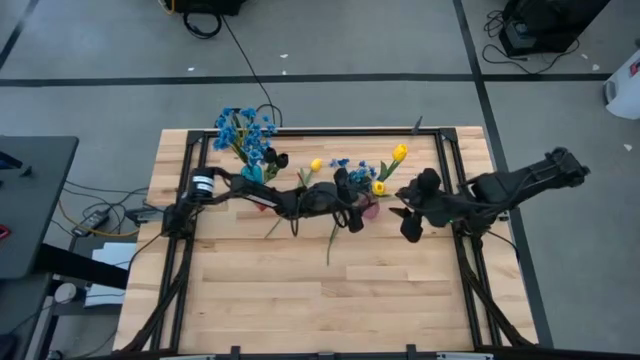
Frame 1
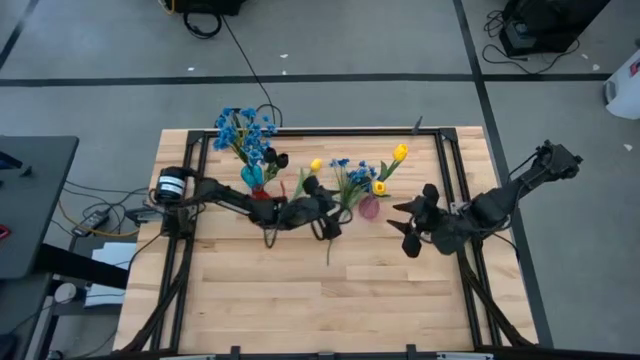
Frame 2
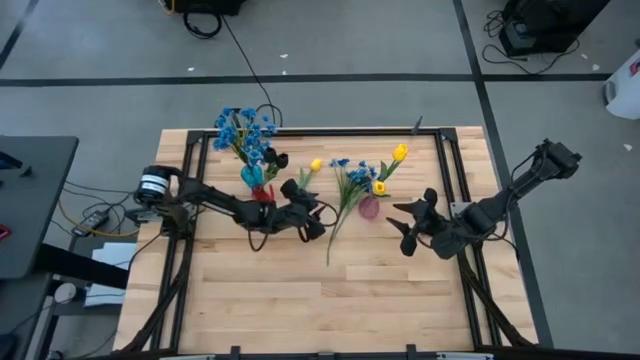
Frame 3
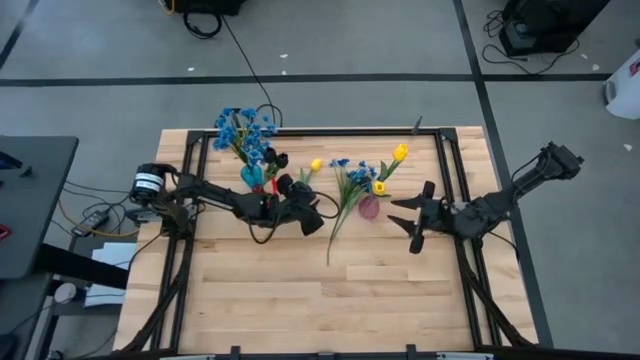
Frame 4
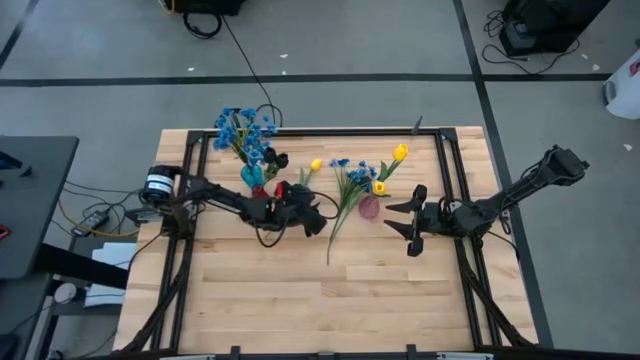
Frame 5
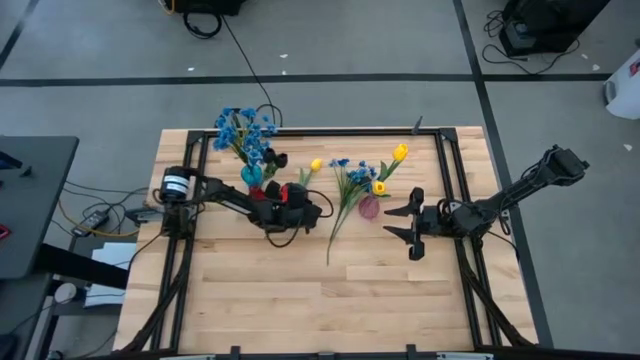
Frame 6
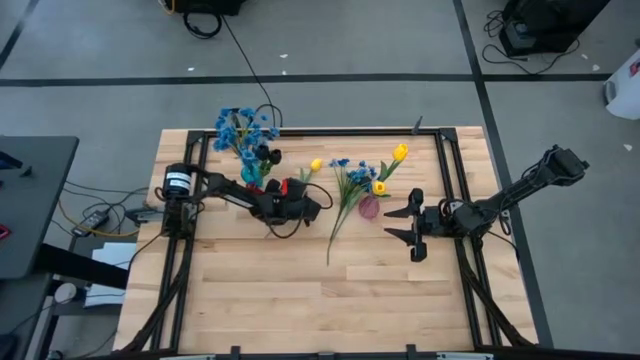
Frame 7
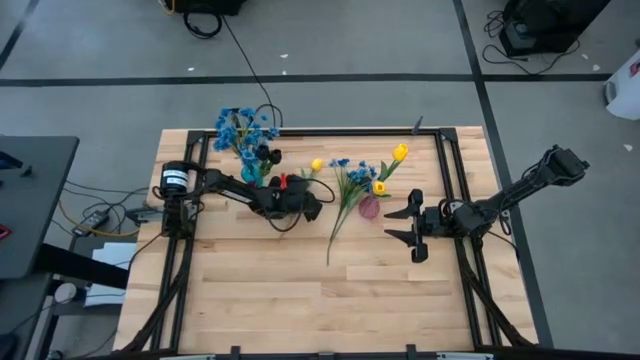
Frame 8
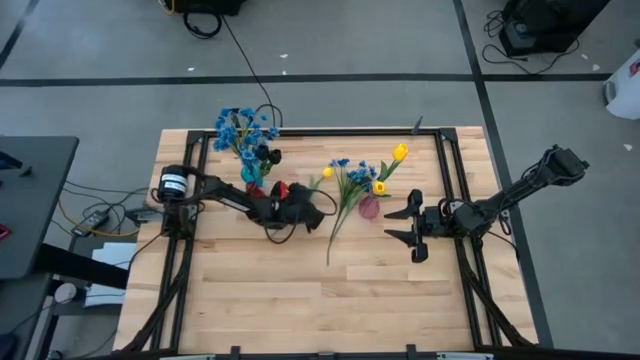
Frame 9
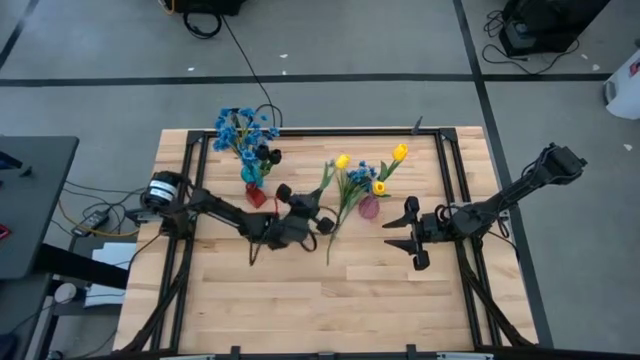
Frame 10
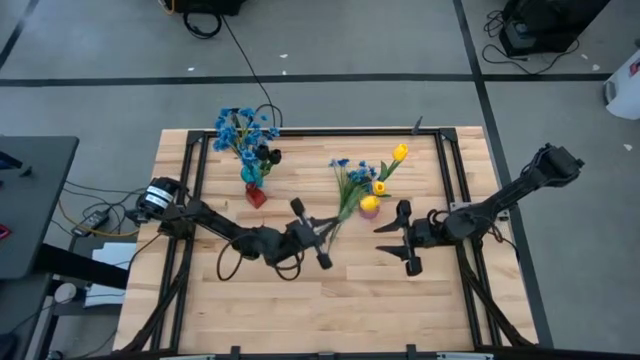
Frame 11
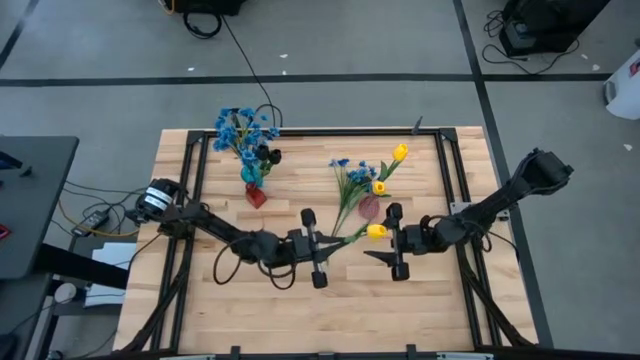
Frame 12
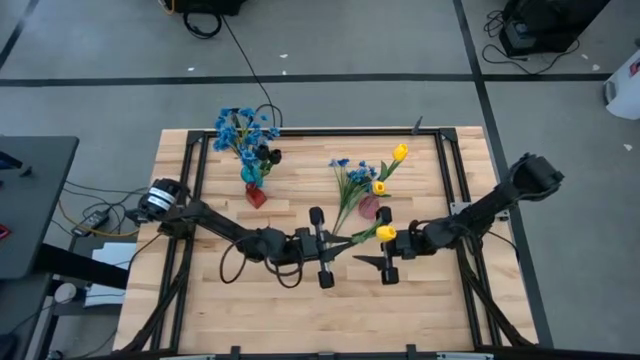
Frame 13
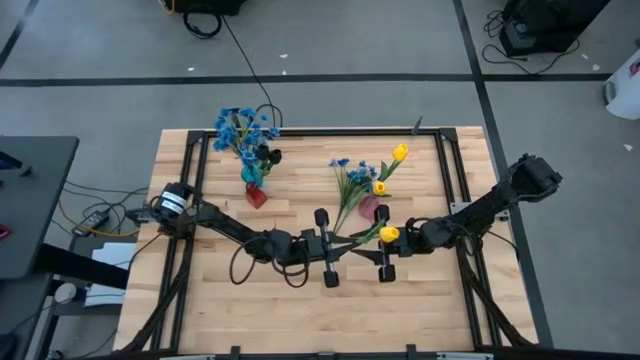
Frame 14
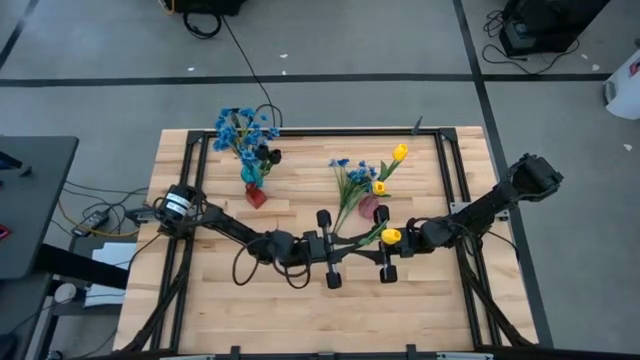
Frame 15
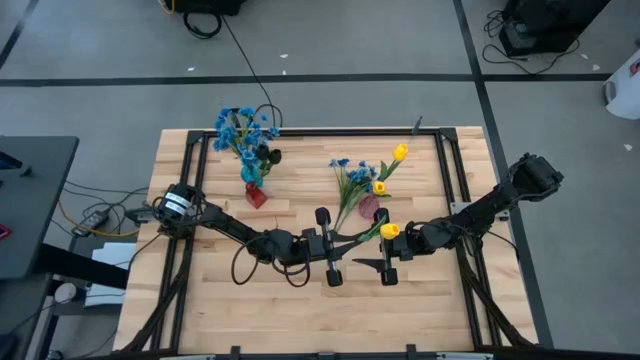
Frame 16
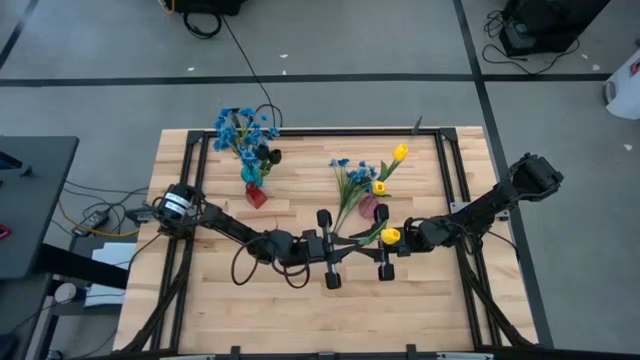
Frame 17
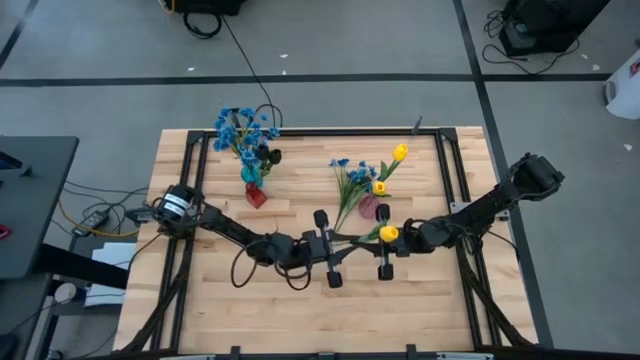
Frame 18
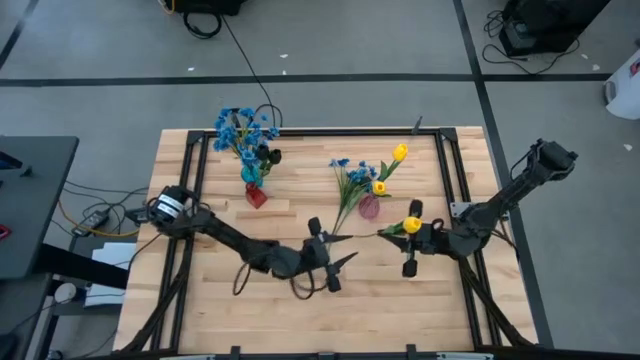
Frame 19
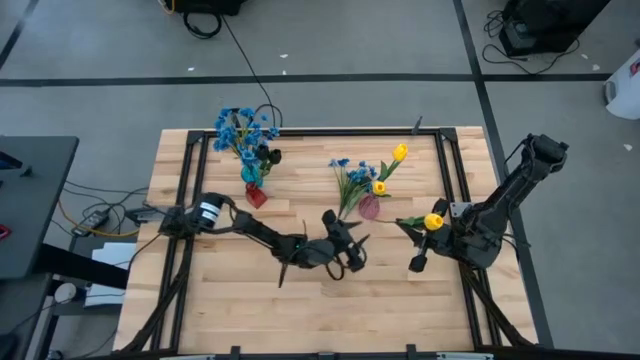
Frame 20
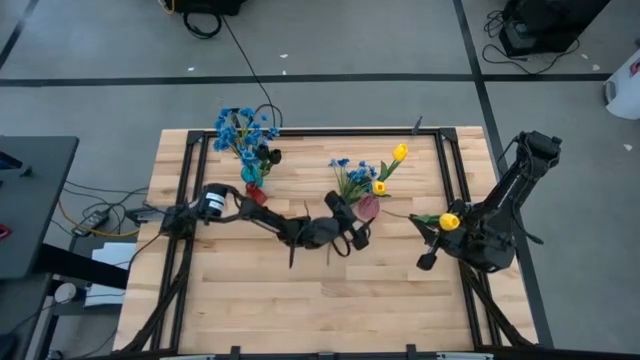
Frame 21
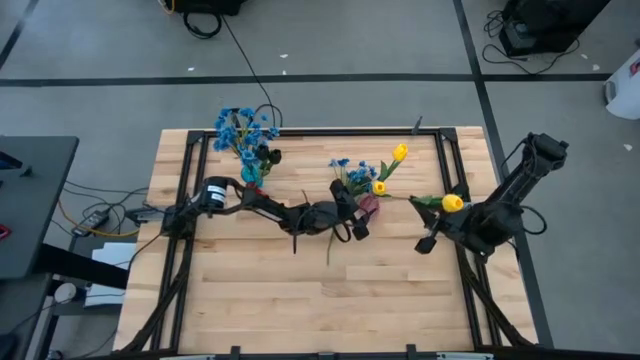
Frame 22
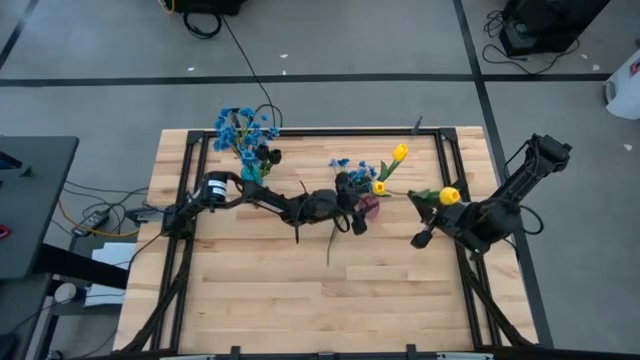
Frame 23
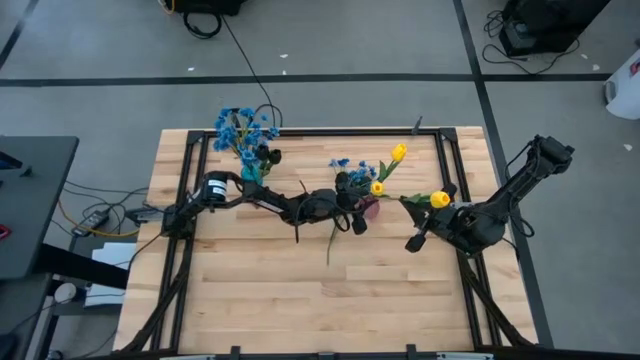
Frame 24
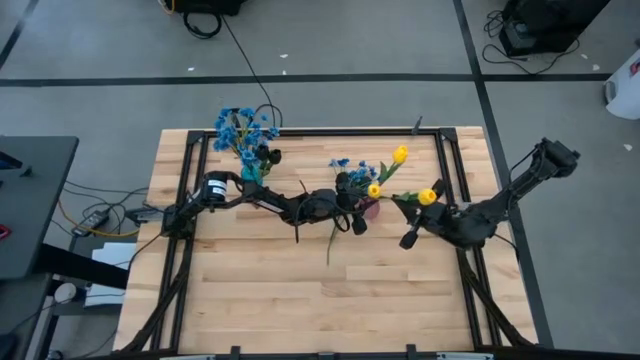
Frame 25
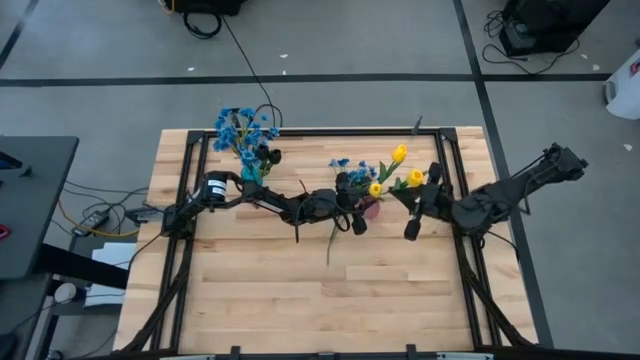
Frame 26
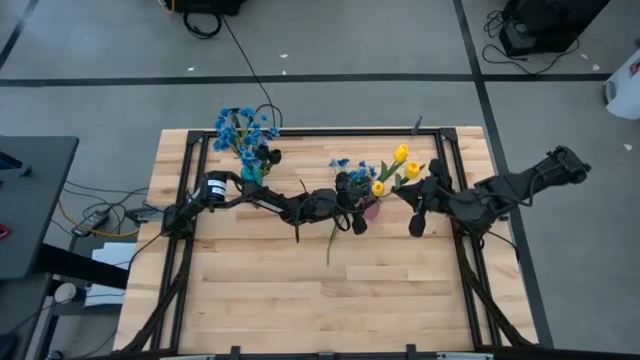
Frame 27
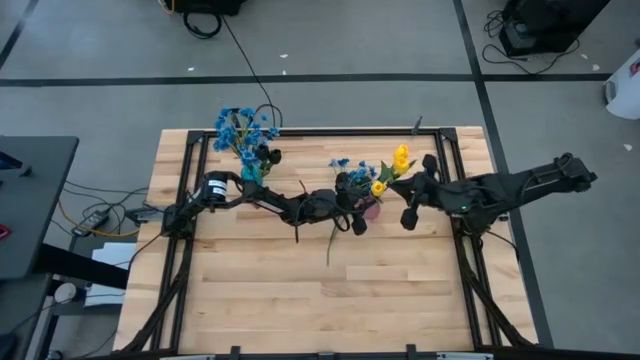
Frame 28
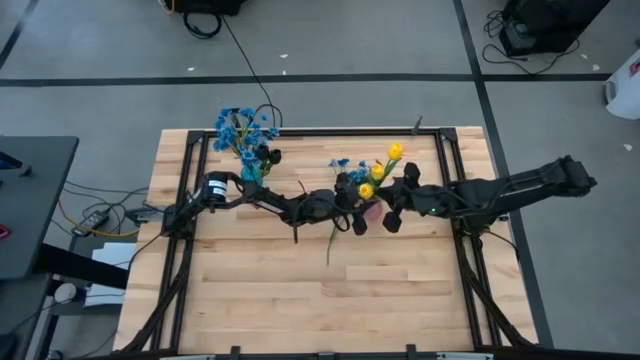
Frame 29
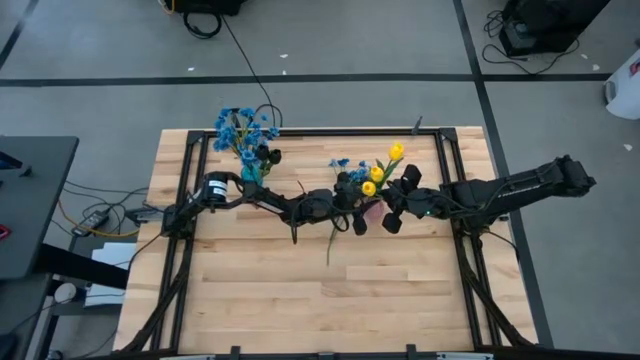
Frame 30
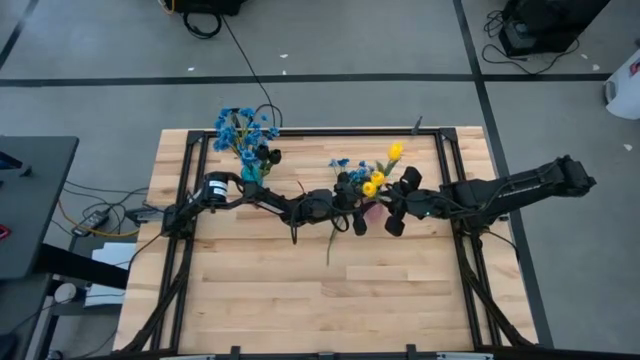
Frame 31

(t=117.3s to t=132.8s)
Task: Sort flowers into vase by color
Put the yellow flower into the pink vase

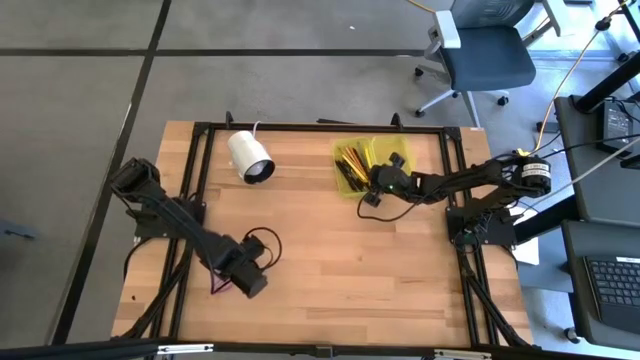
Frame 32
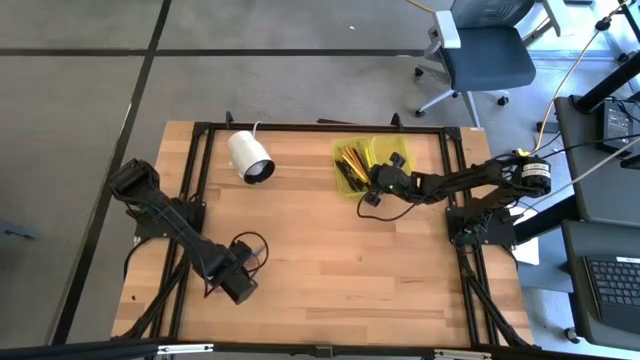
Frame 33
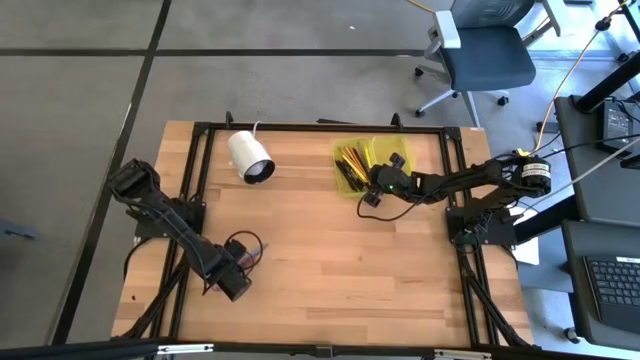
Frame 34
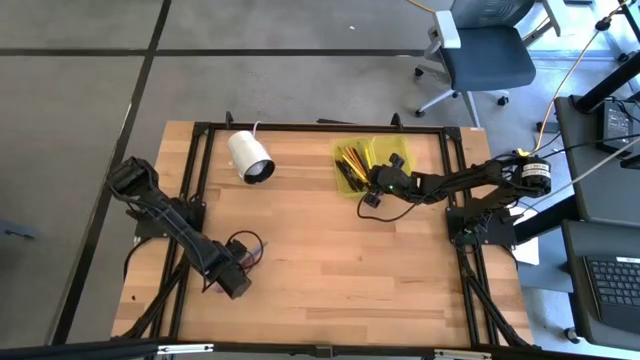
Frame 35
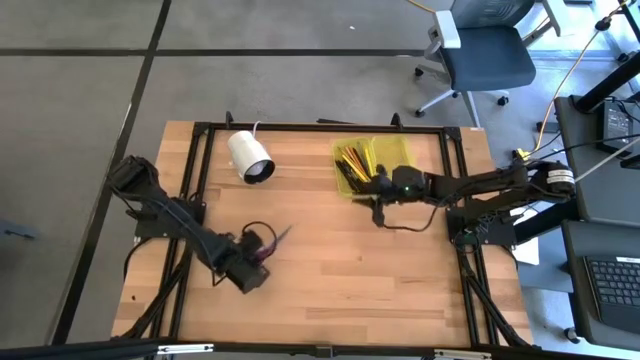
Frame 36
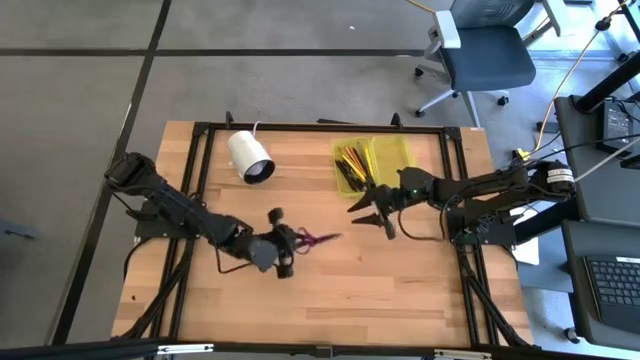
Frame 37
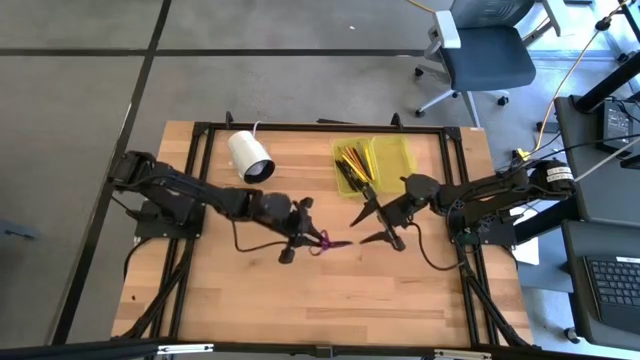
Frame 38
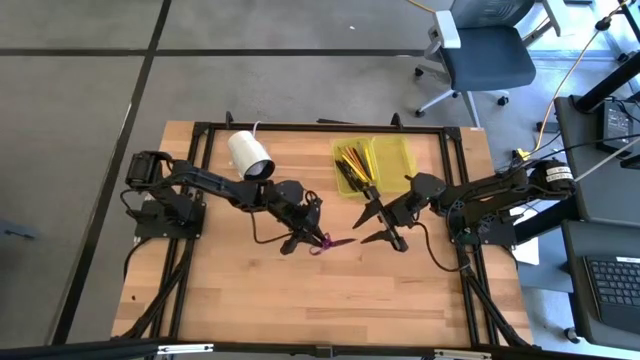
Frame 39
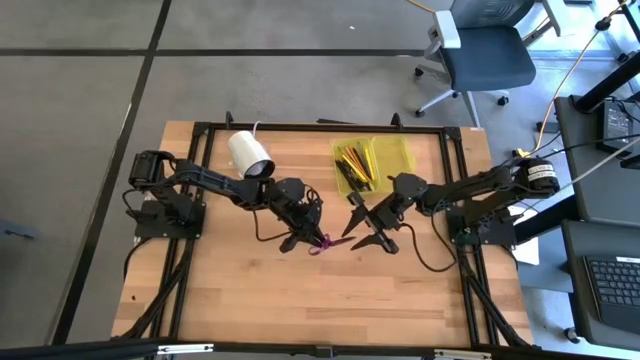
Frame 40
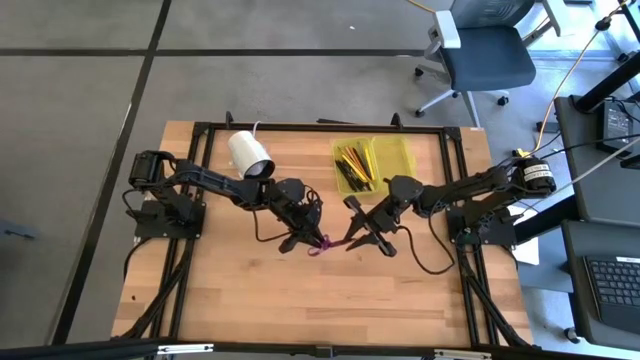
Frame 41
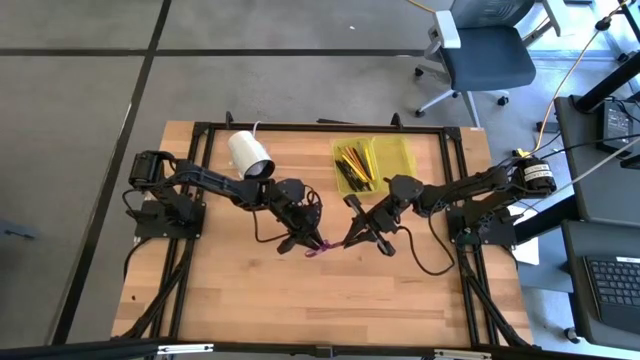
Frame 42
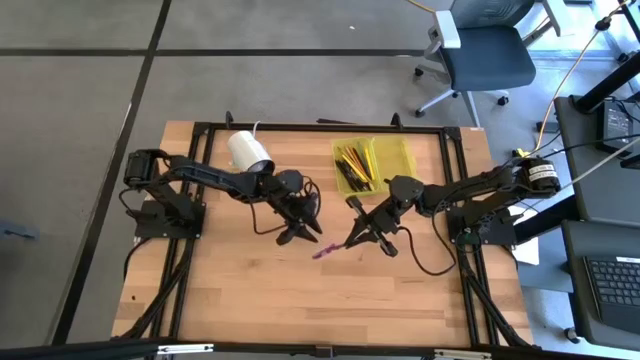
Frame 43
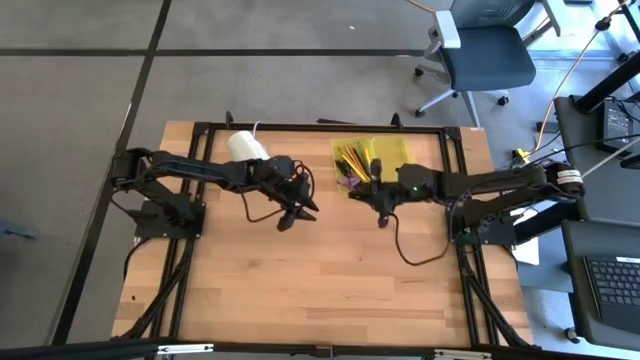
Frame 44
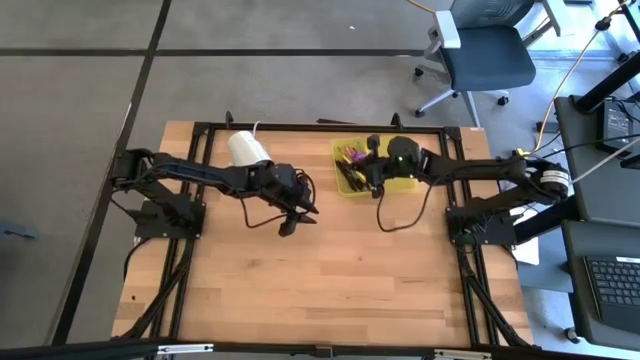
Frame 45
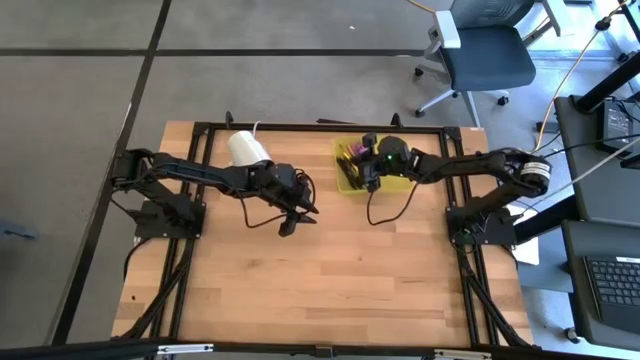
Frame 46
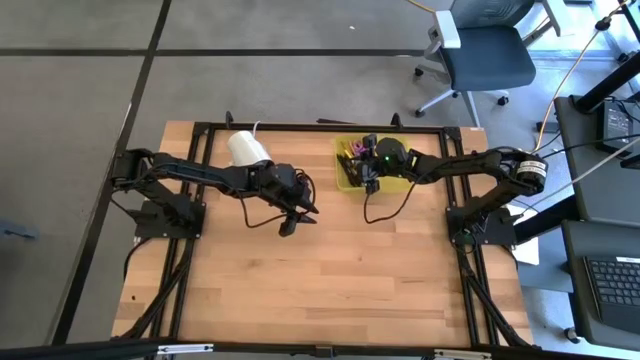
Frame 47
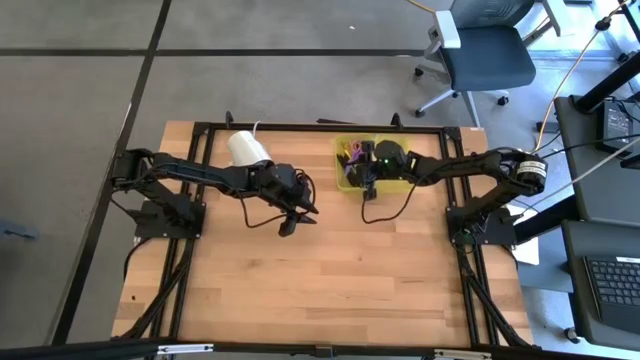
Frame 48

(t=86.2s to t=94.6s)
Task: Pick & place school supplies into a supply box
Put the violet scissors into the yellow supply box
